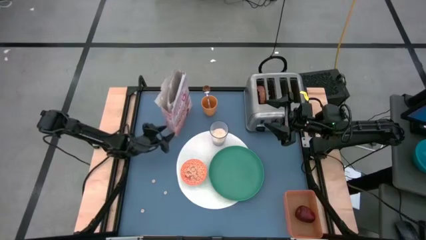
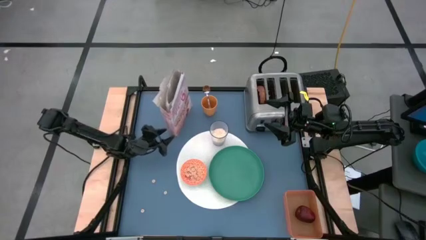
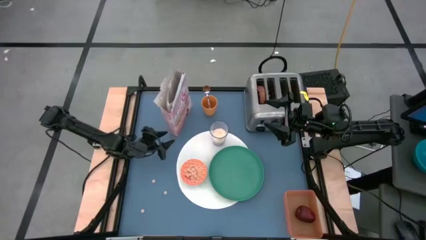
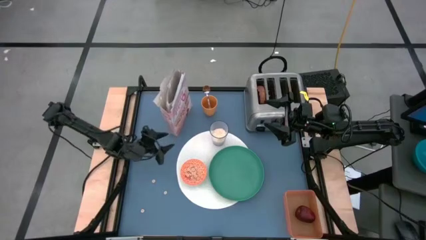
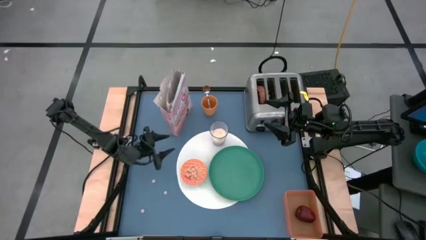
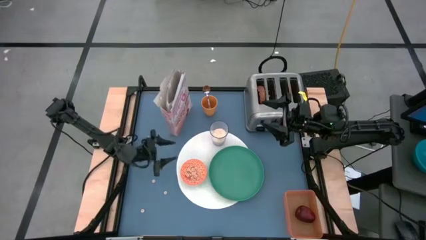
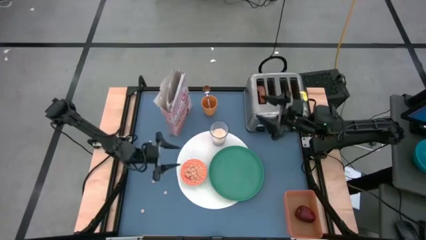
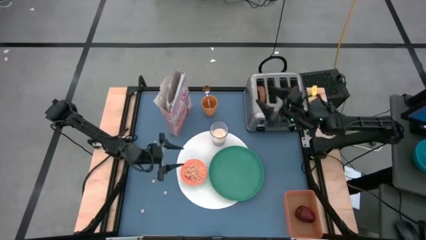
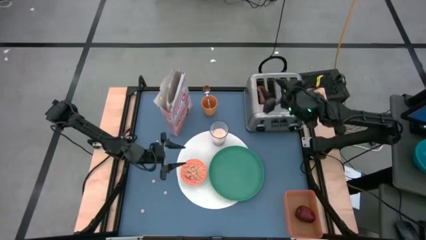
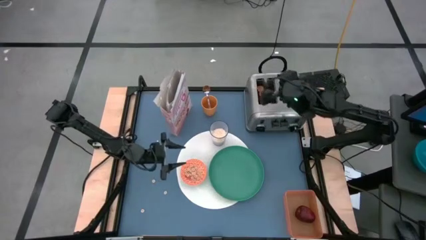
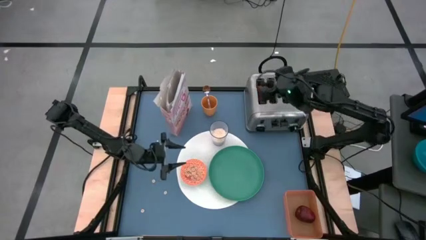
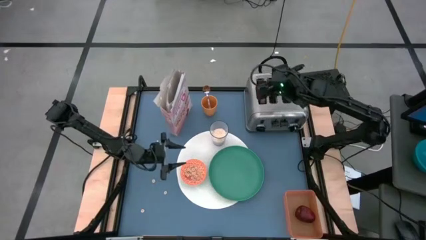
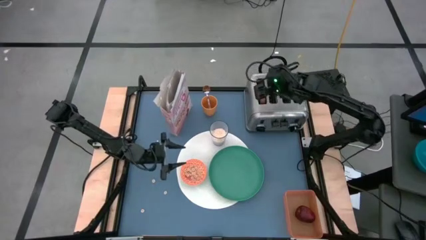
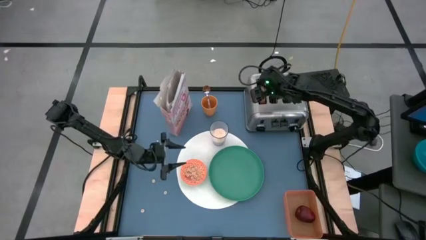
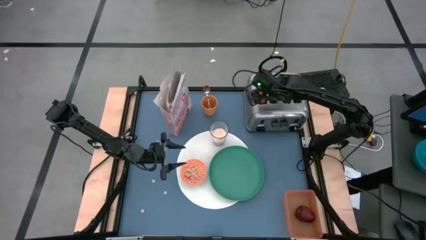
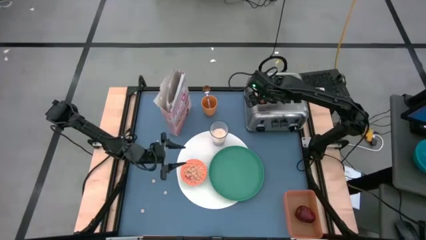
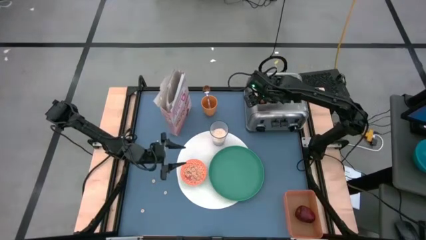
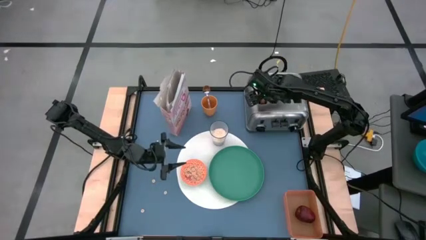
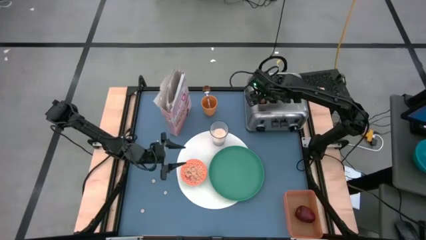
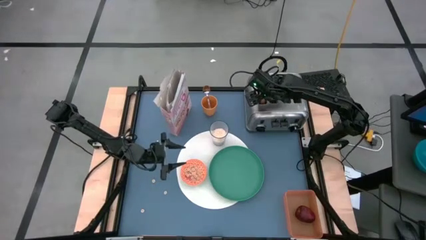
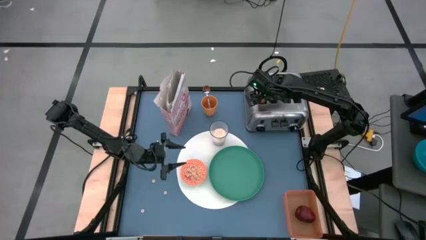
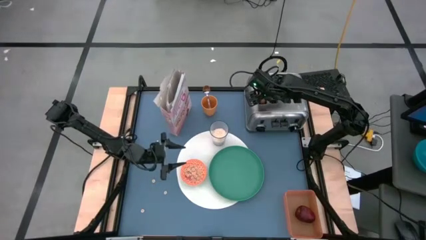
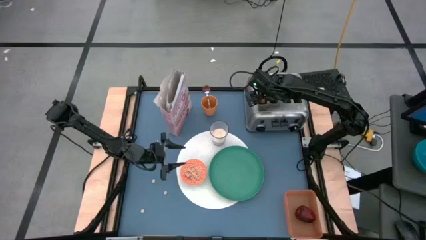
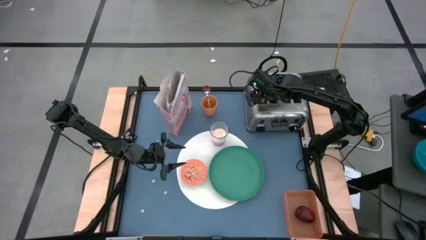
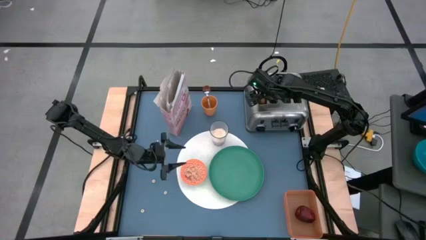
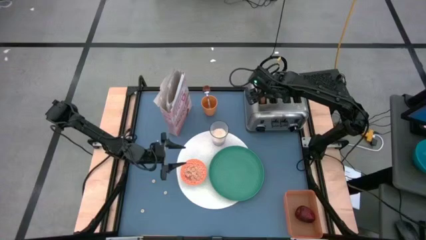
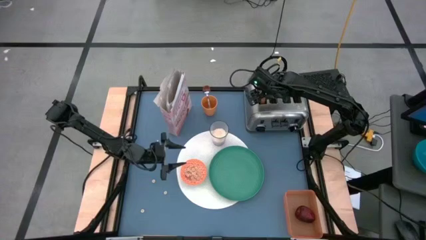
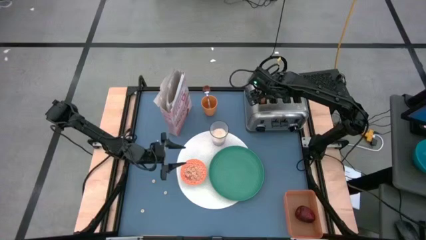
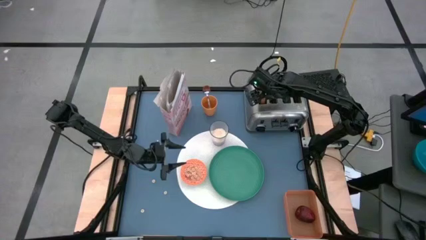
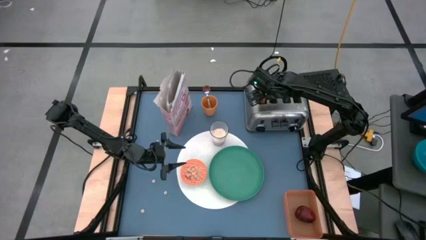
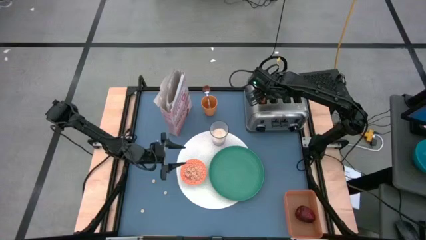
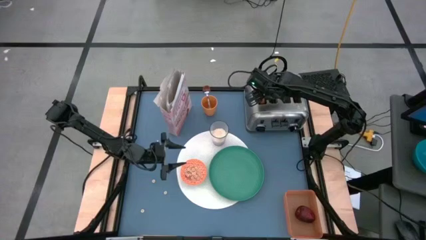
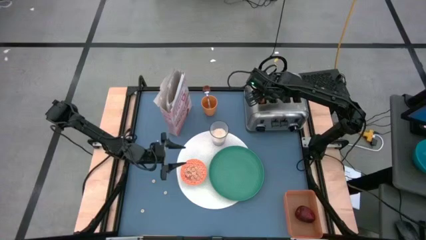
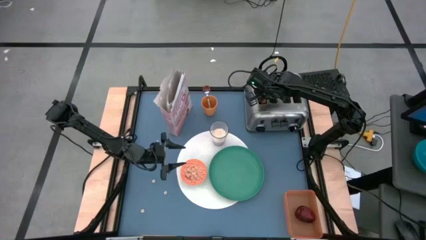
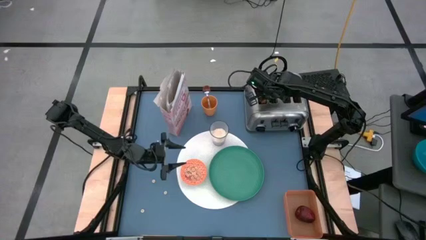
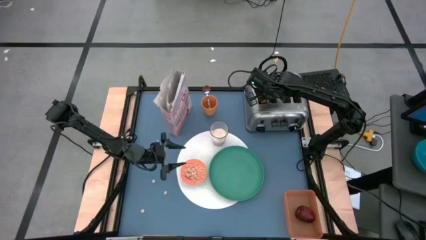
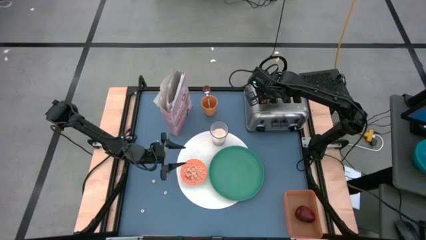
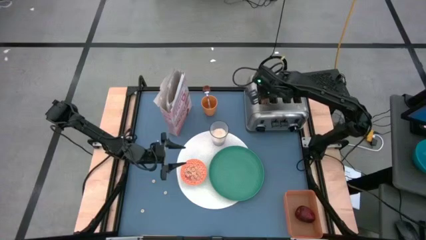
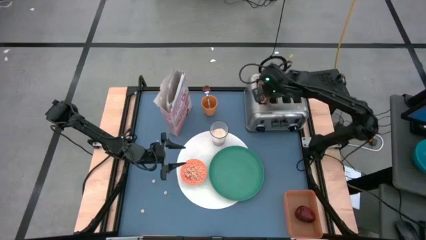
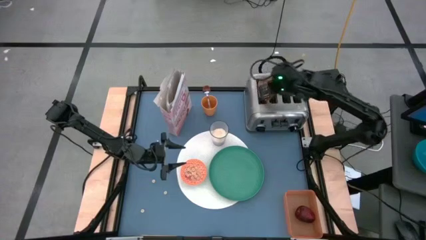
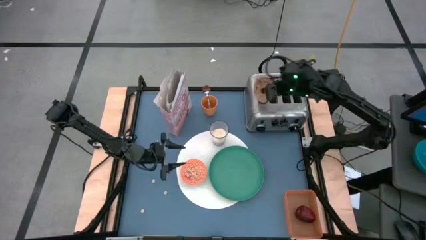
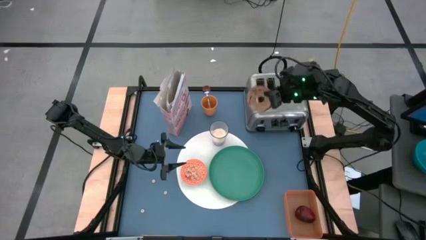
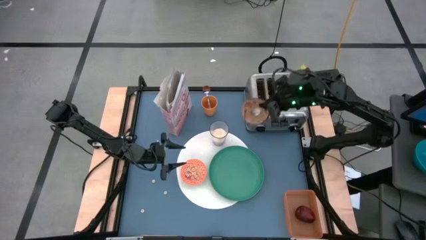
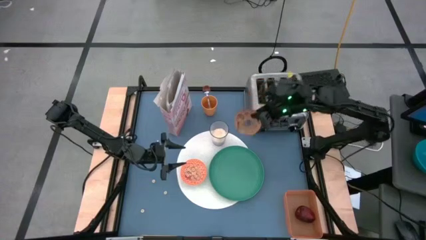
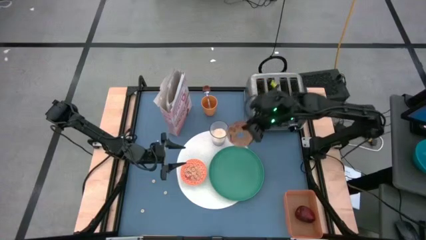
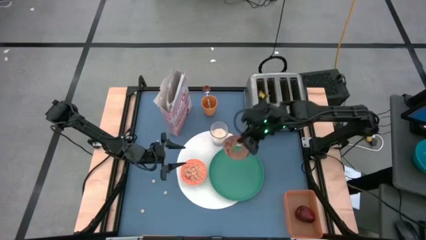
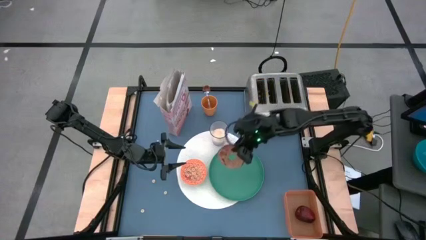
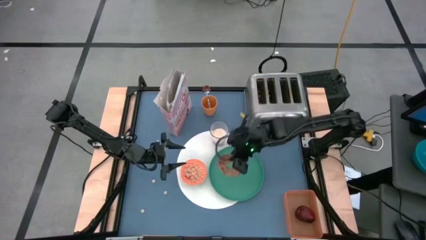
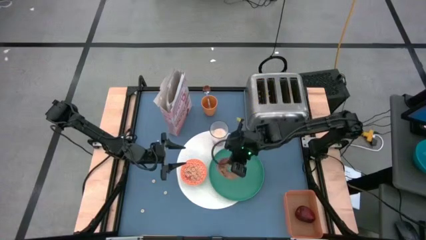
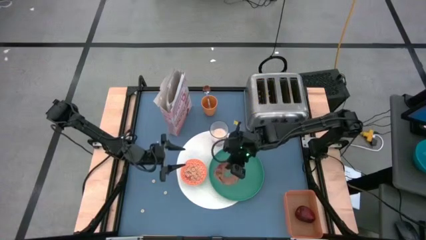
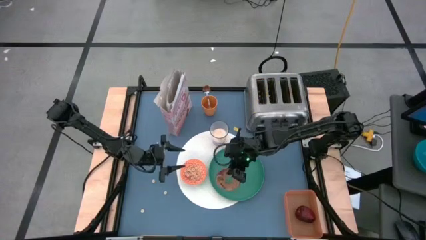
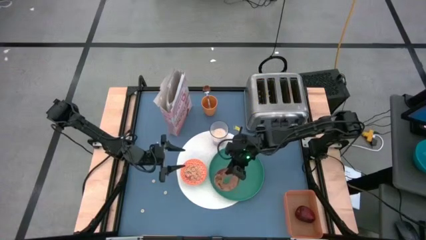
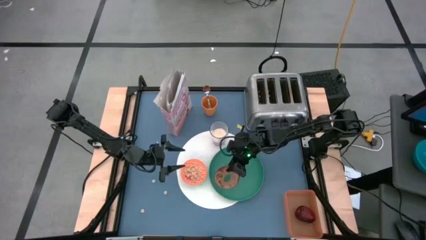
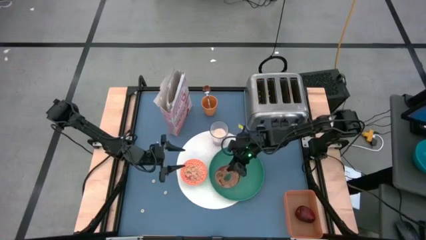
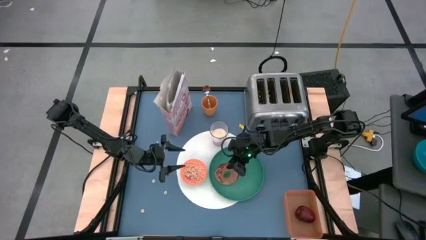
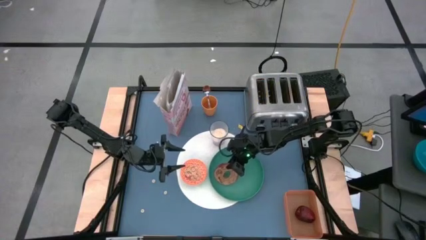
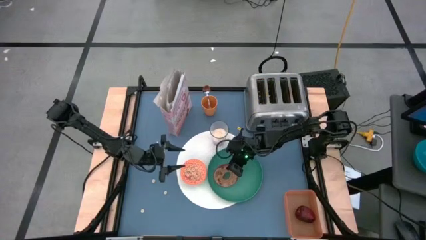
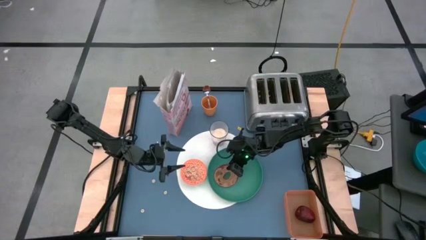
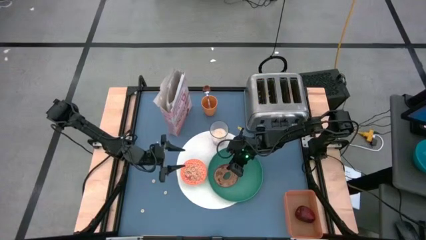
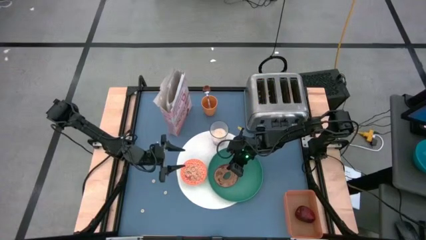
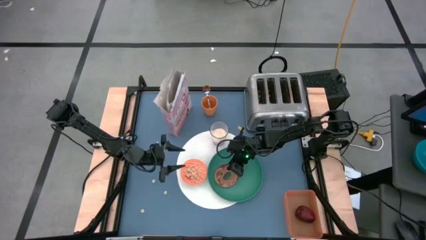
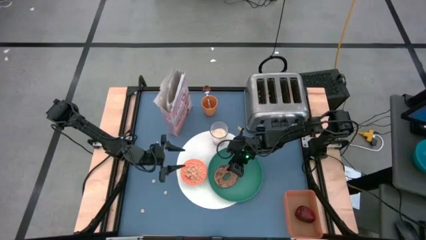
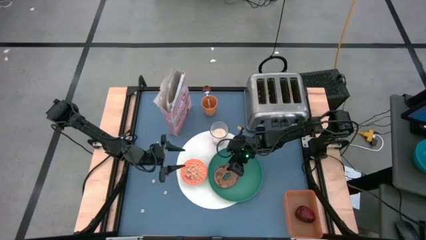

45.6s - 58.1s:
Task: Arrange a breakfast setting
Put the toast bread on the green plate

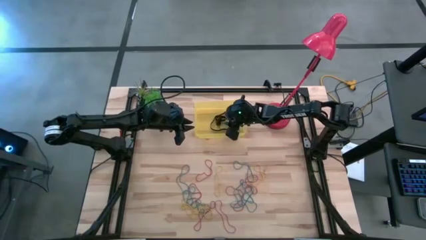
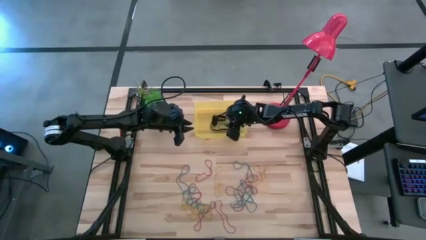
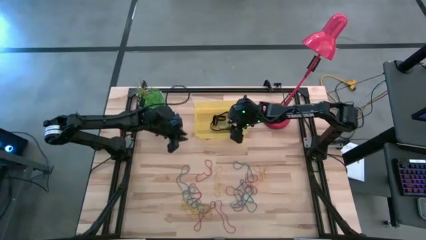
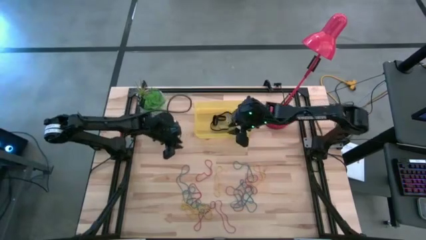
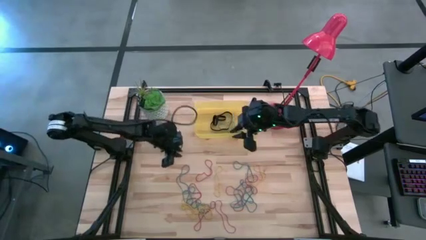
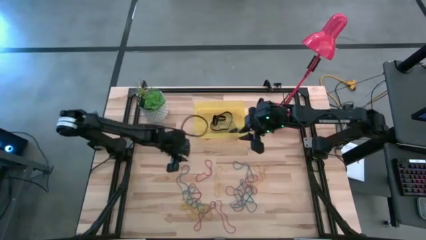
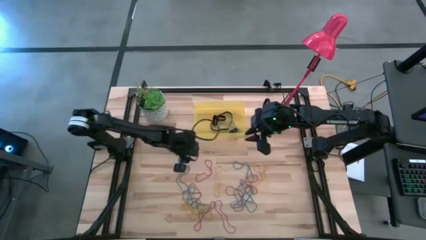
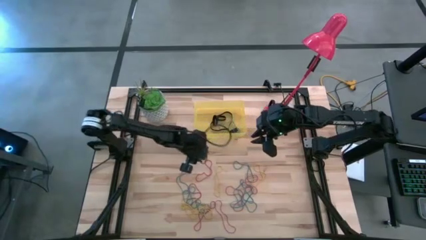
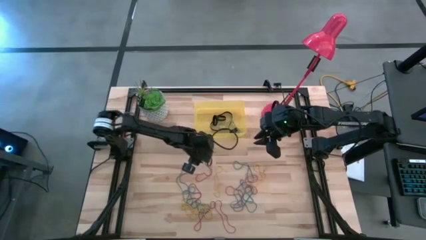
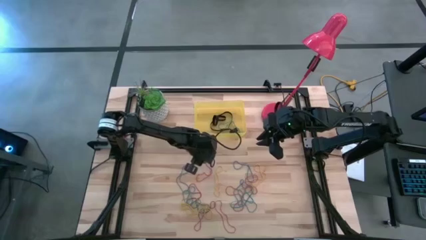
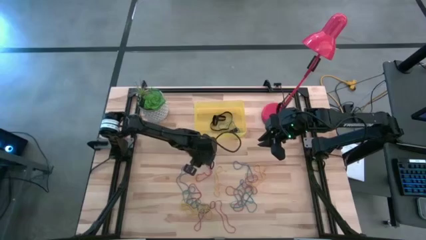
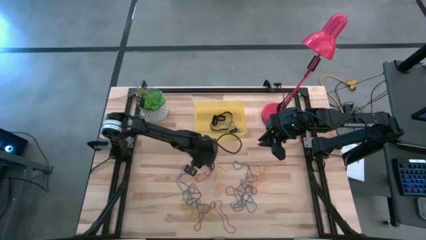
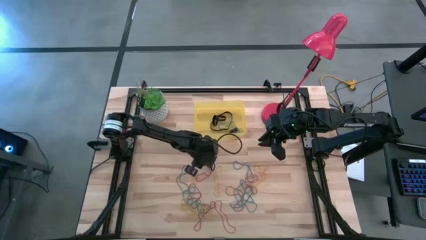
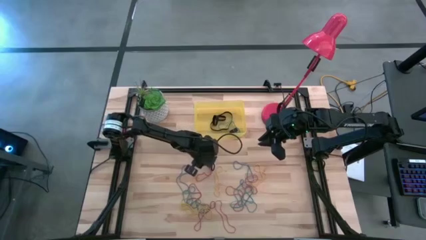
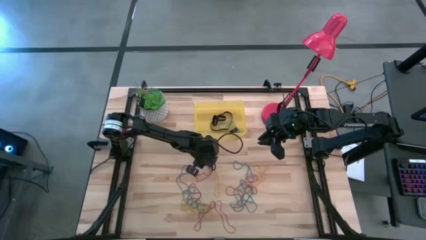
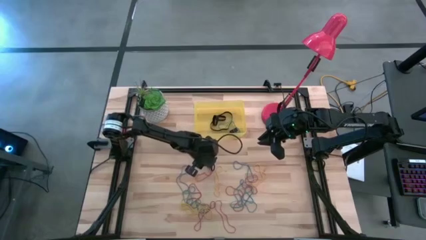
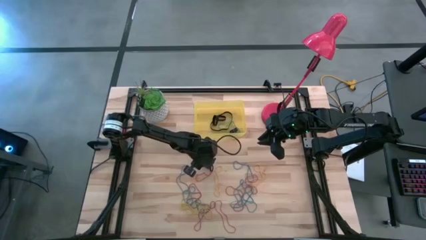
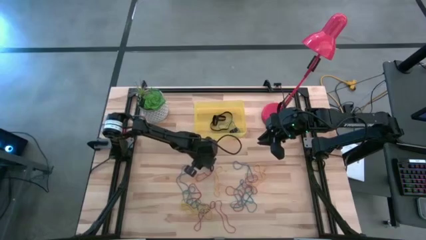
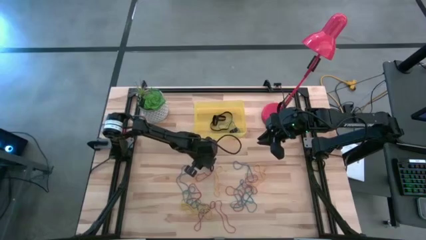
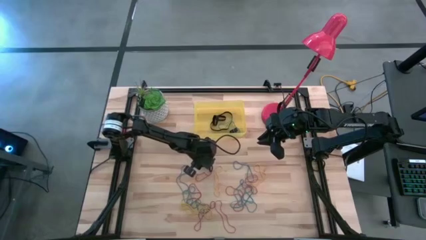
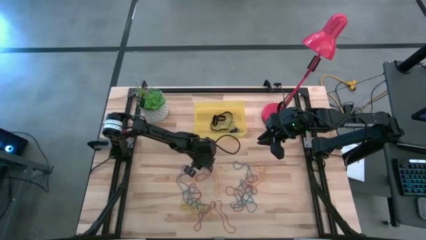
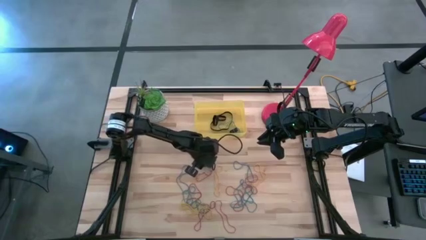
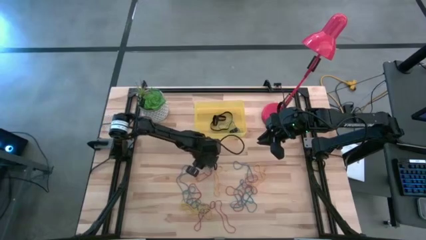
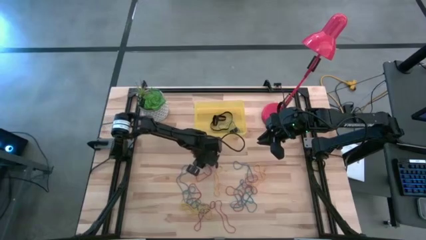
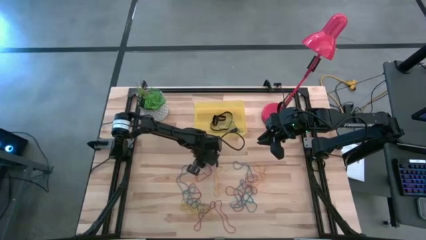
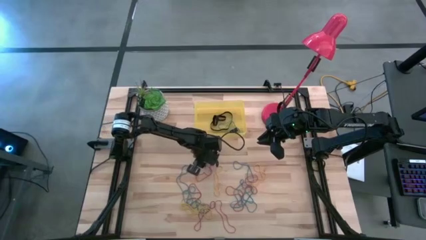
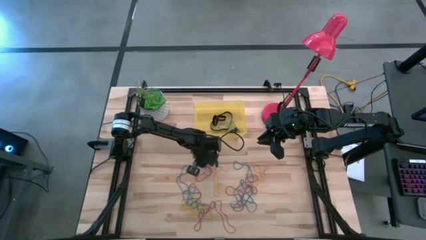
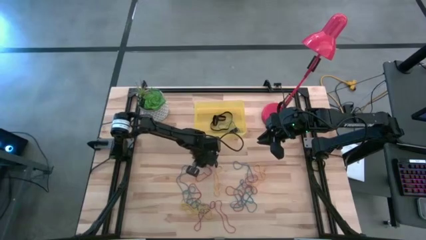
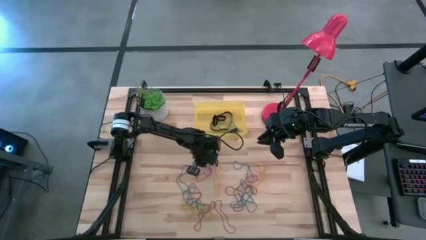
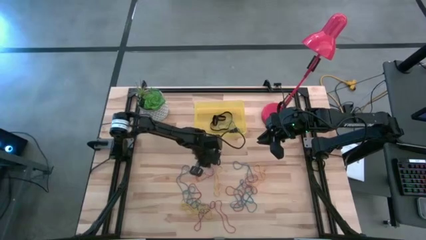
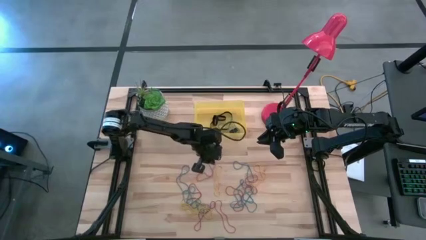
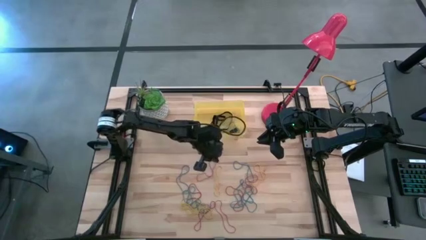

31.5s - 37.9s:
Task: Pick and place rubber bands into bin
Put the red rubber band into the yellow bin
